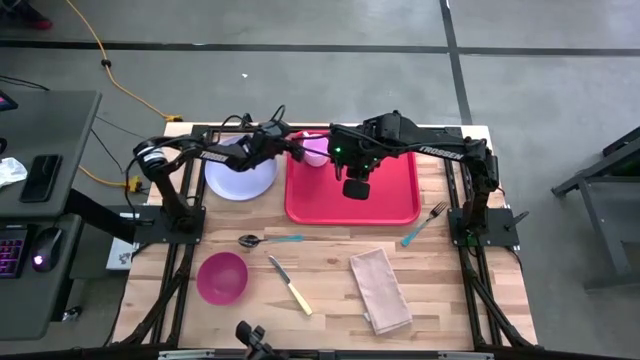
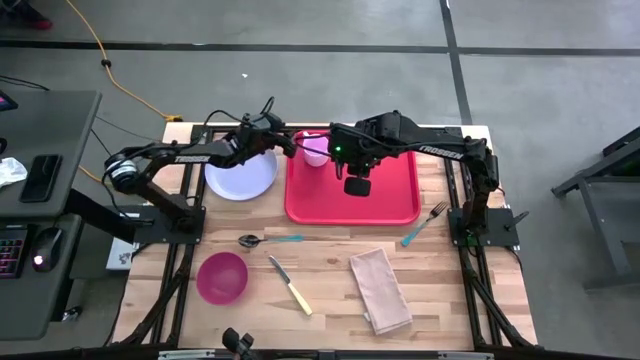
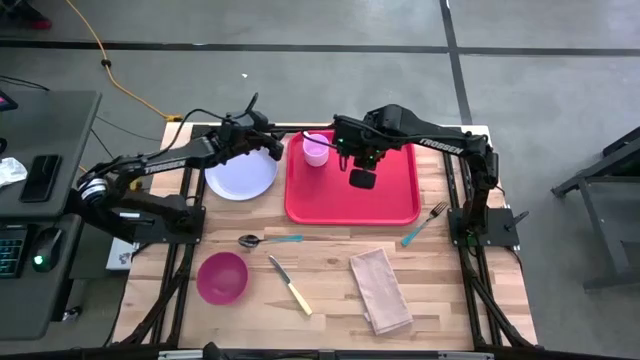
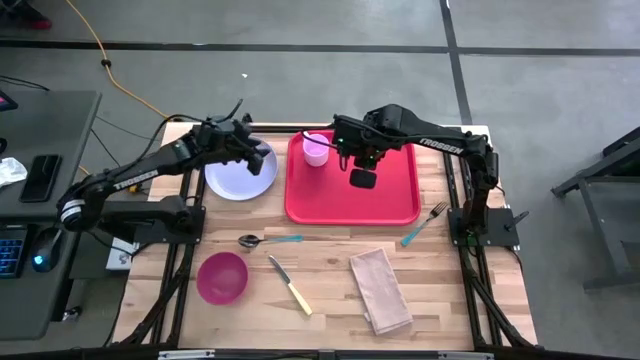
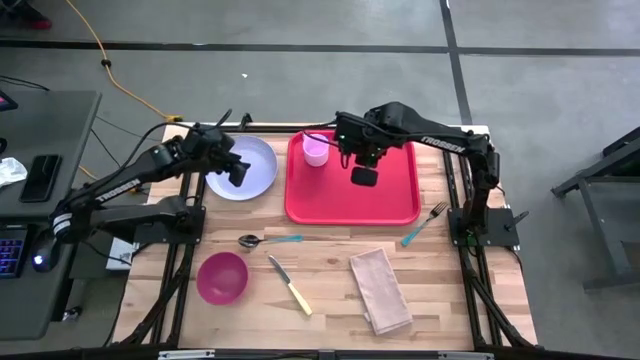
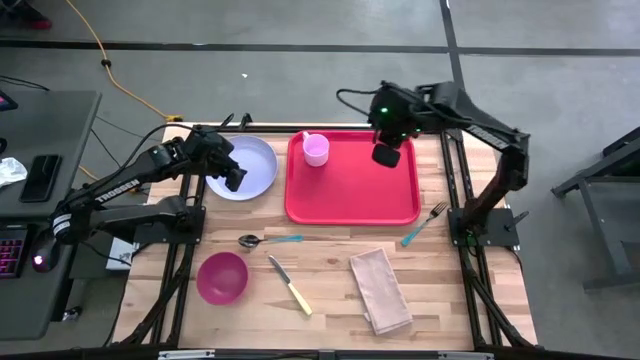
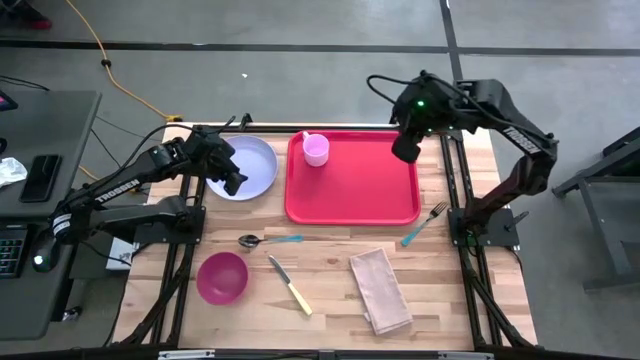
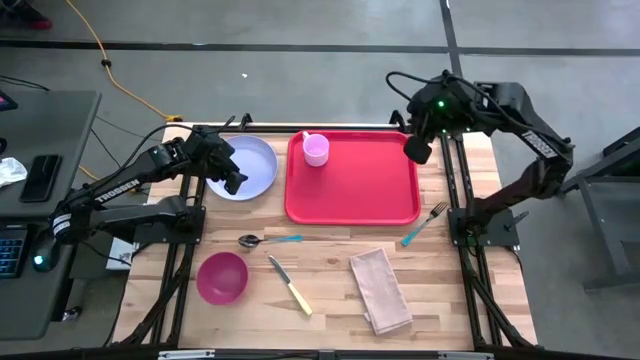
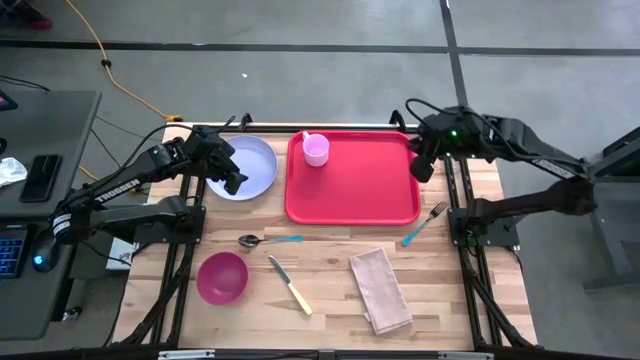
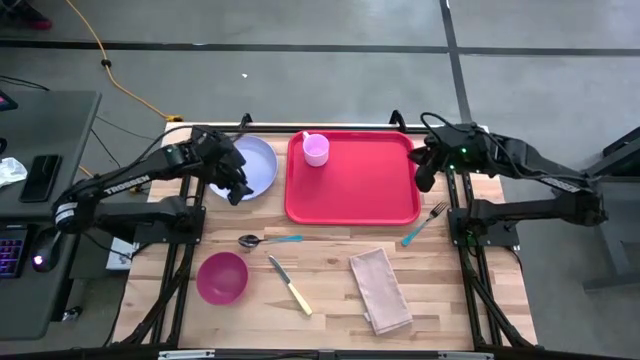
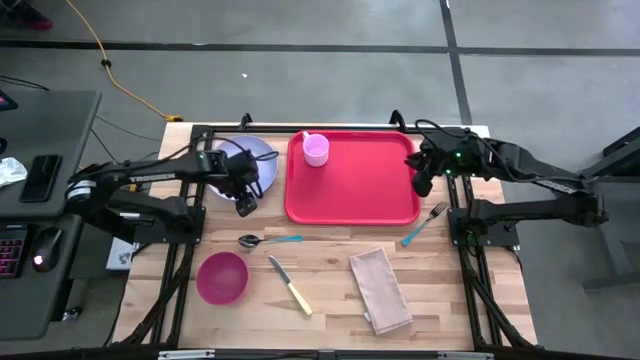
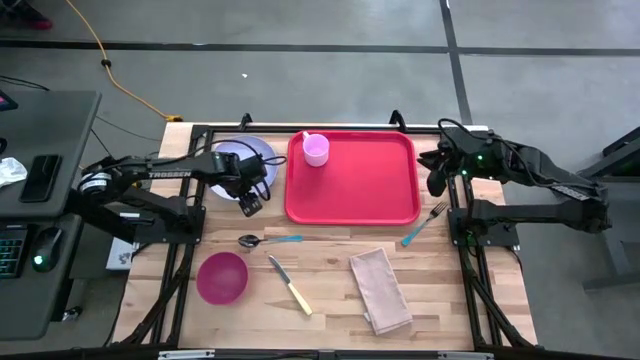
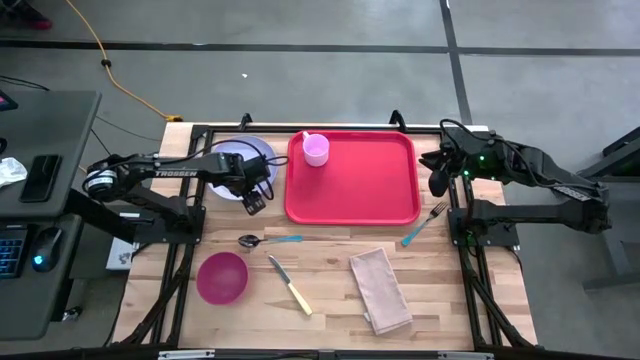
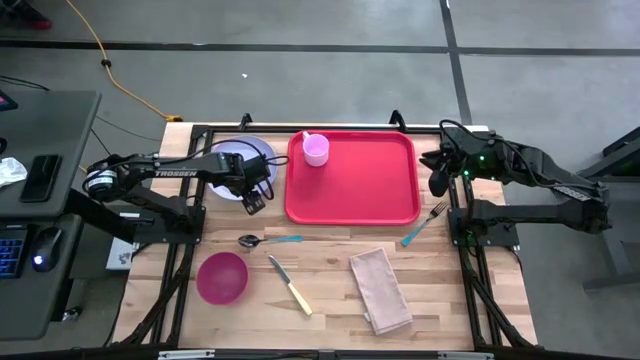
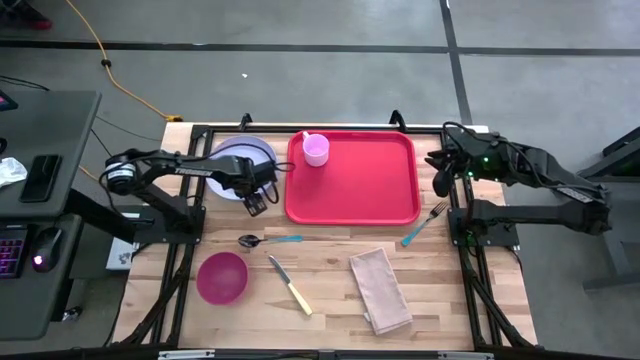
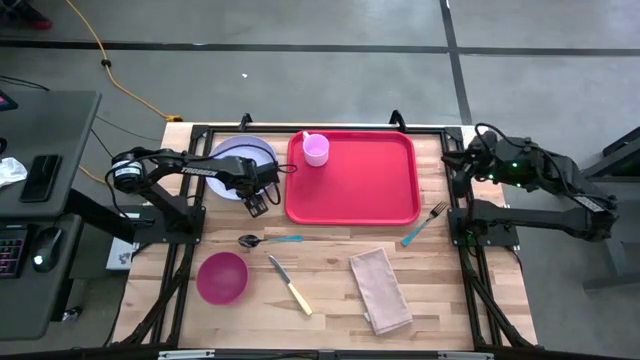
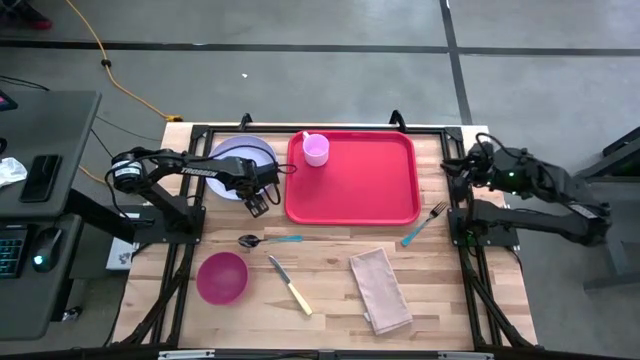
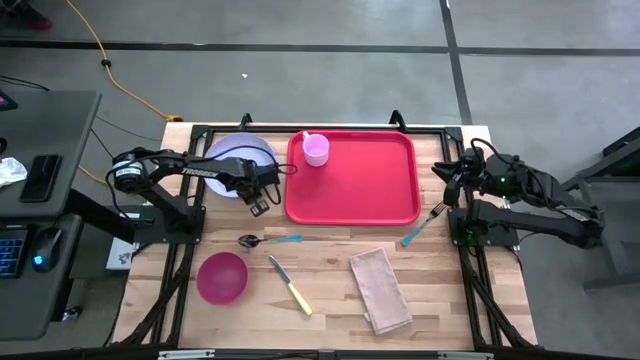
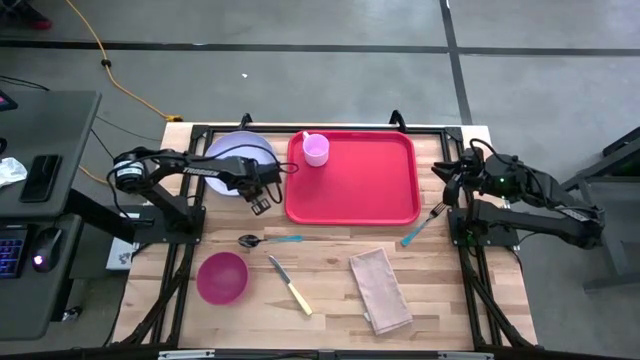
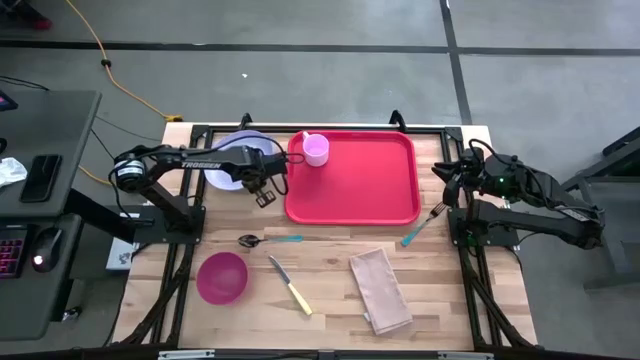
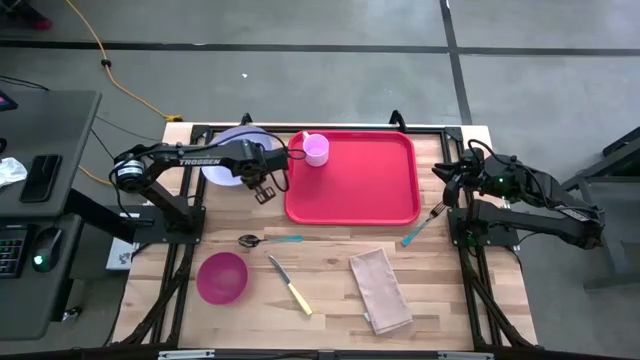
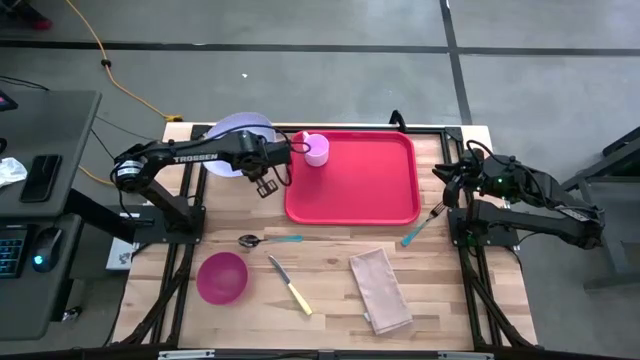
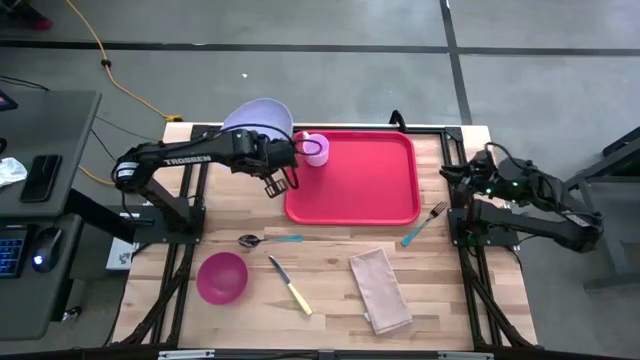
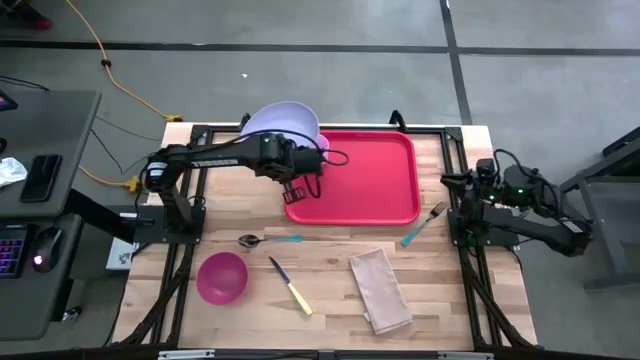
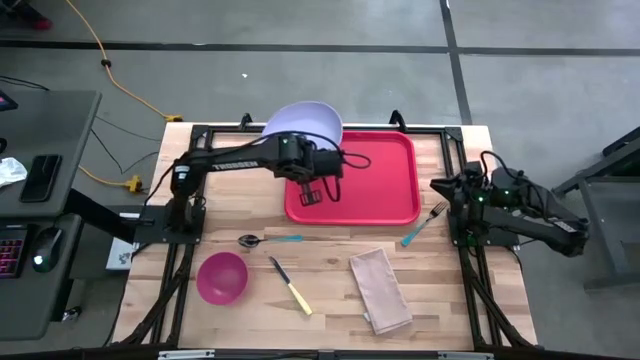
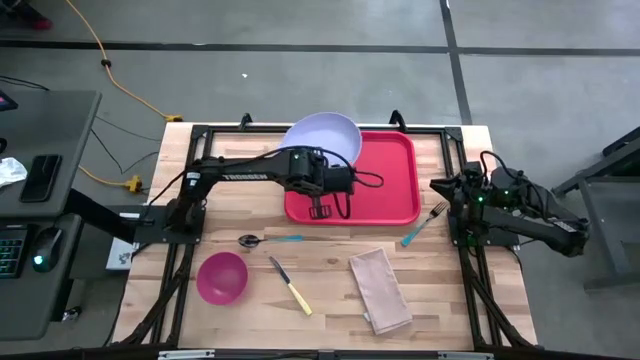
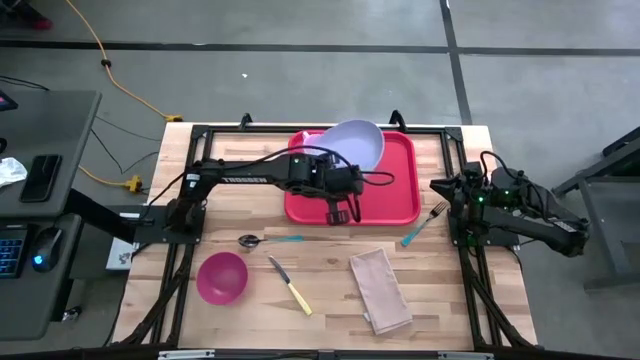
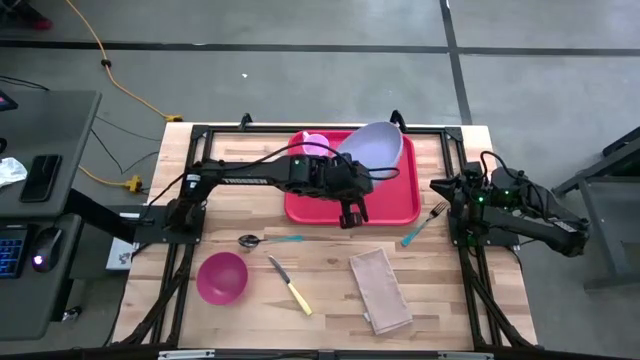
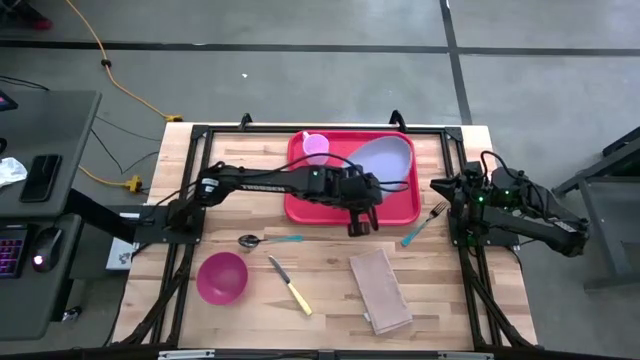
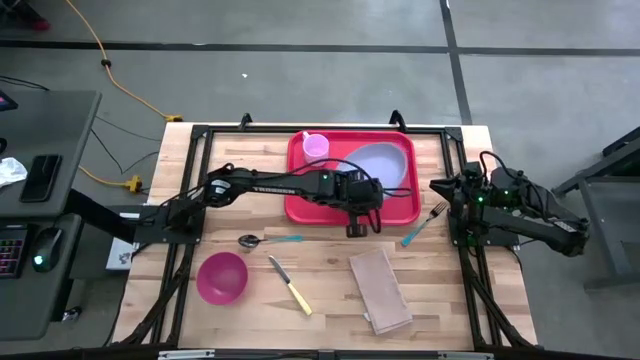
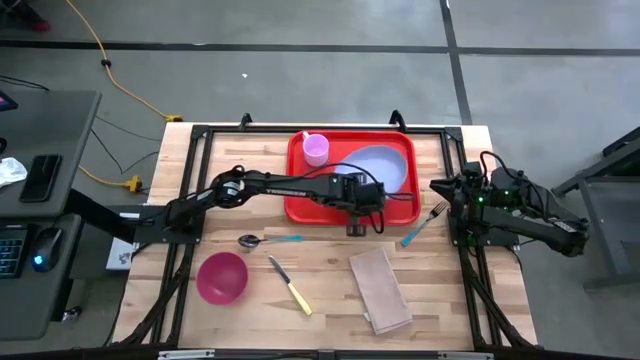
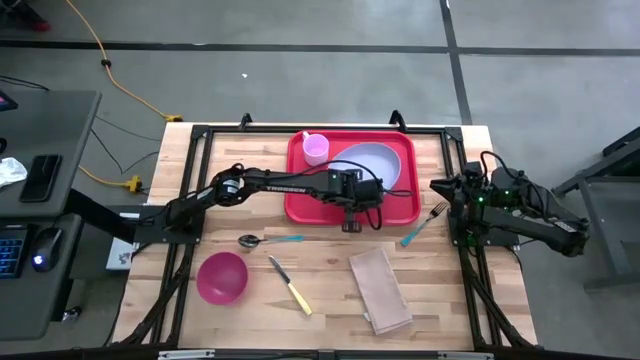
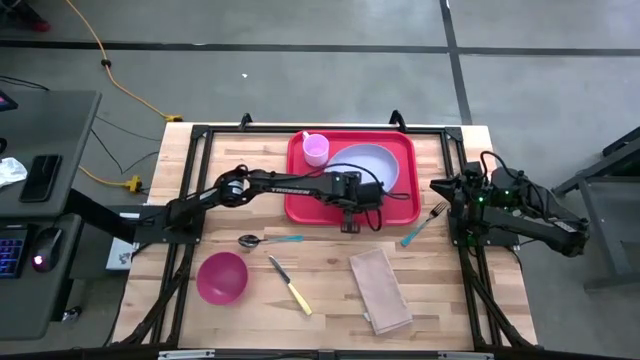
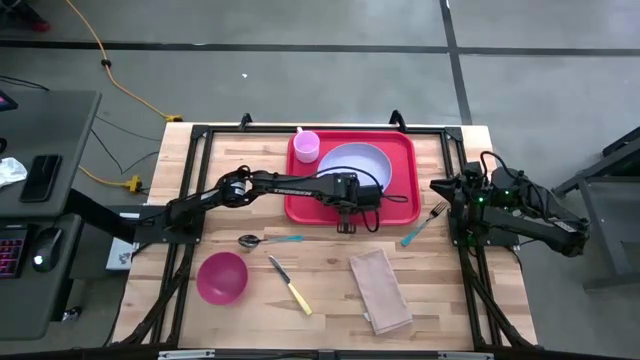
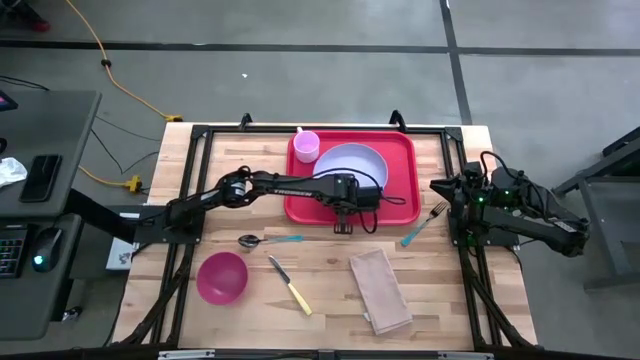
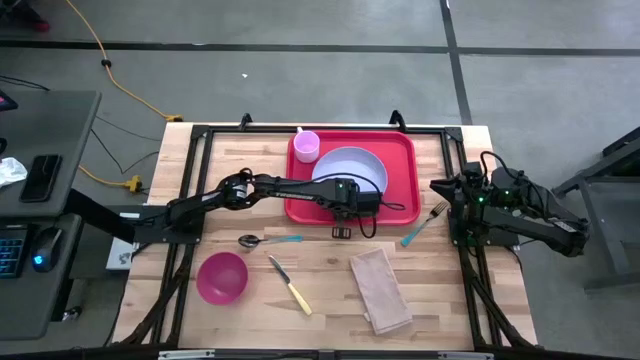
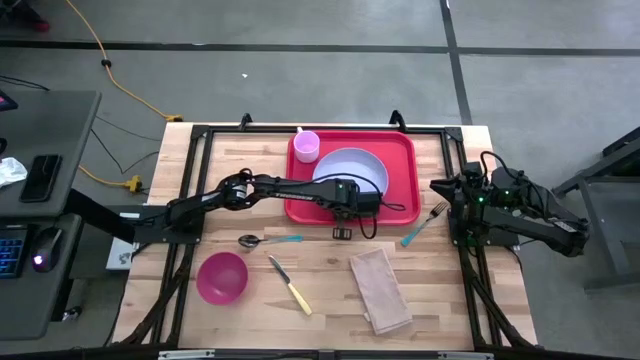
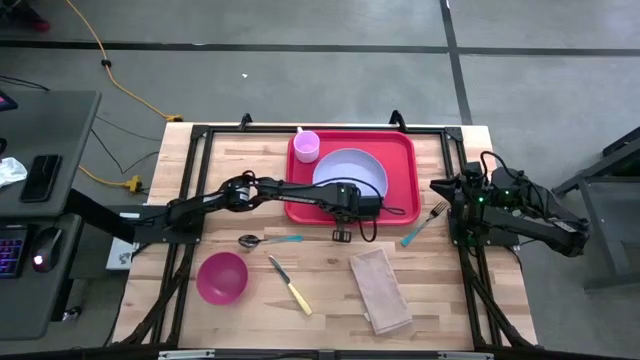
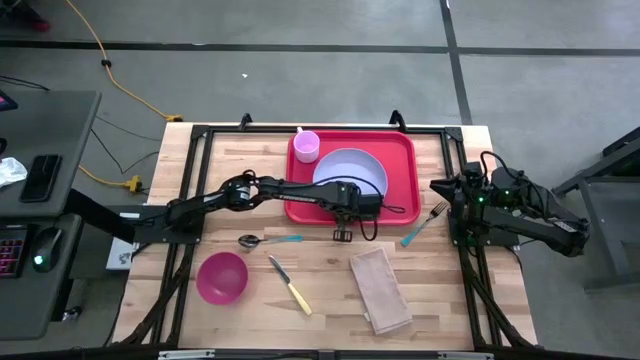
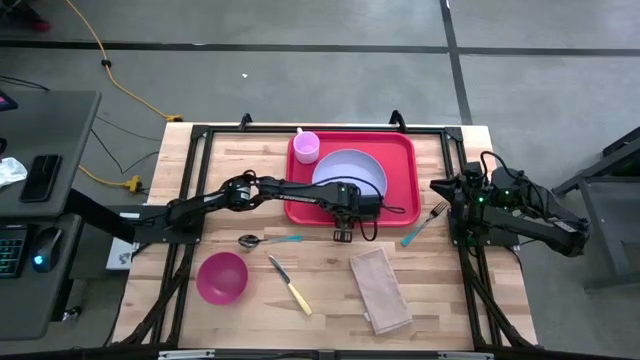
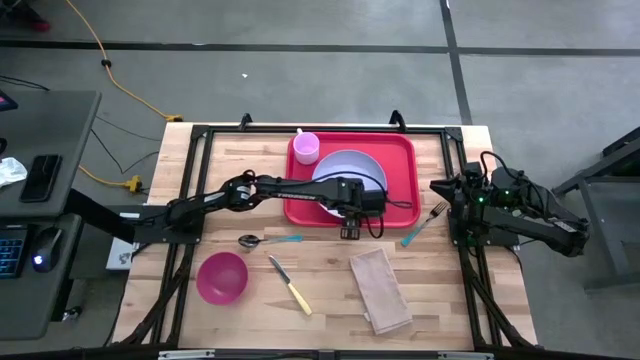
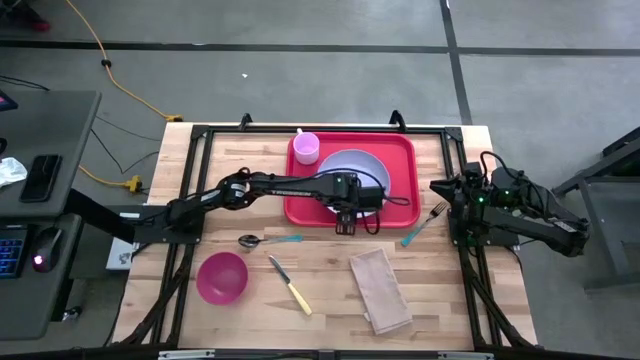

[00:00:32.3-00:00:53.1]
Task: Set up tray
Put the purple plate under the pink mug on the red tray
